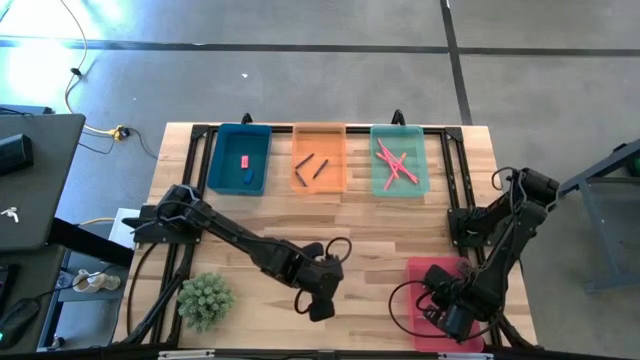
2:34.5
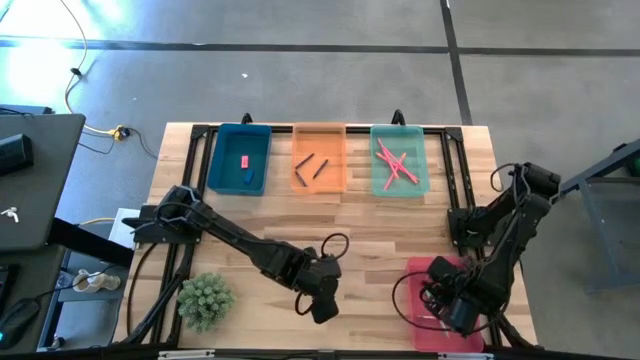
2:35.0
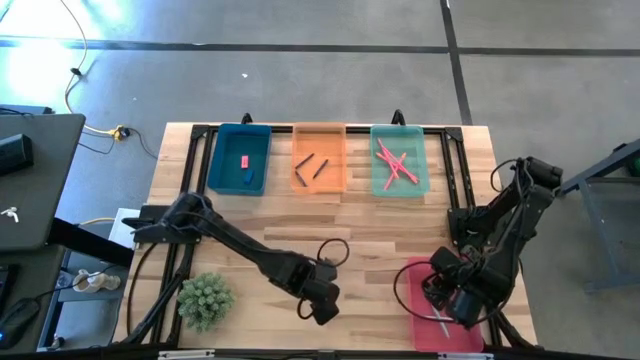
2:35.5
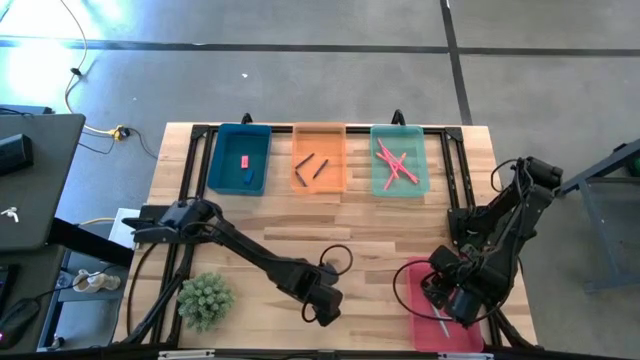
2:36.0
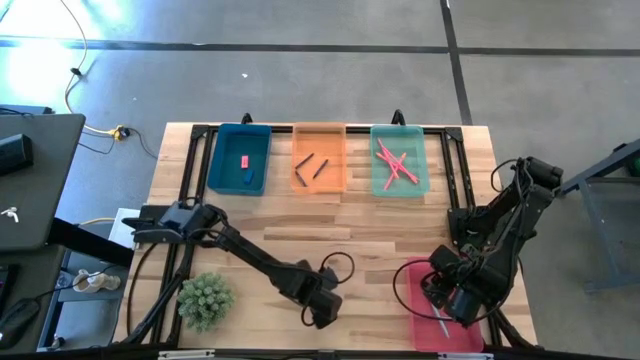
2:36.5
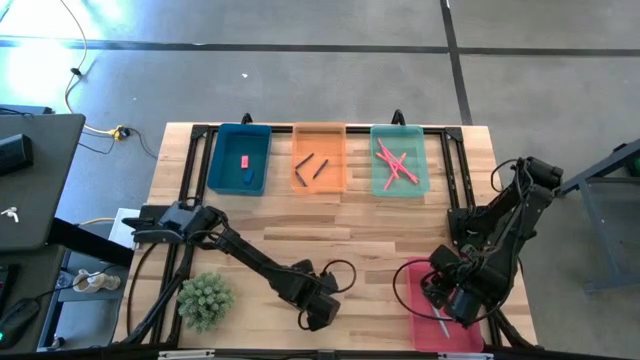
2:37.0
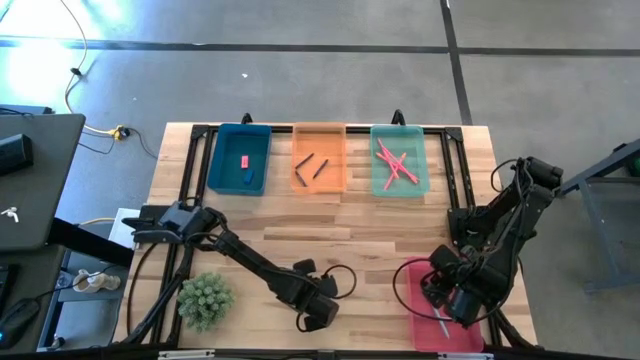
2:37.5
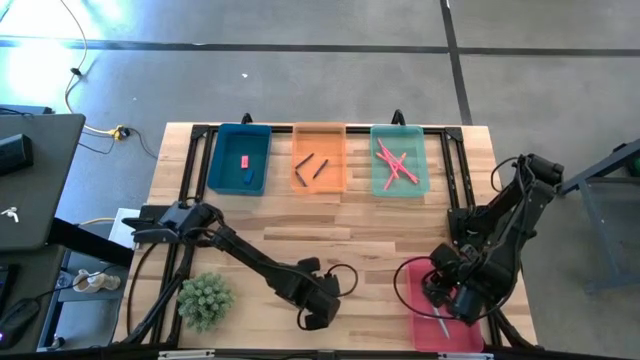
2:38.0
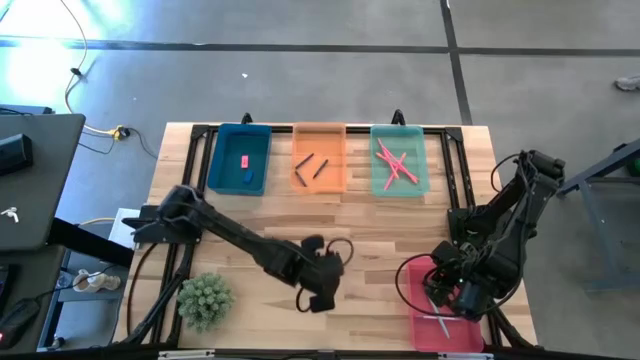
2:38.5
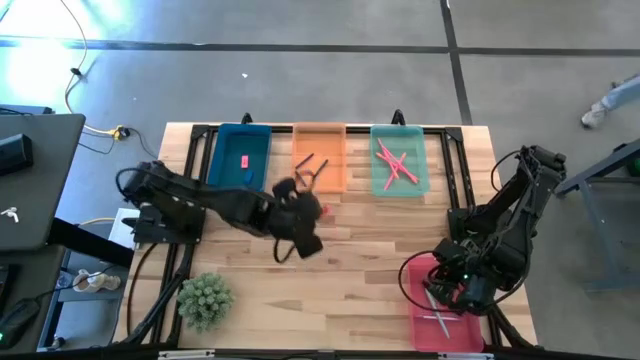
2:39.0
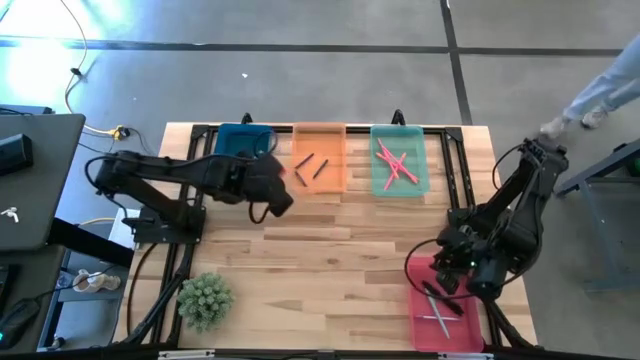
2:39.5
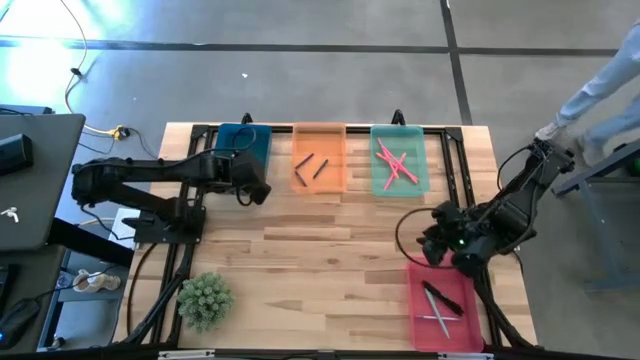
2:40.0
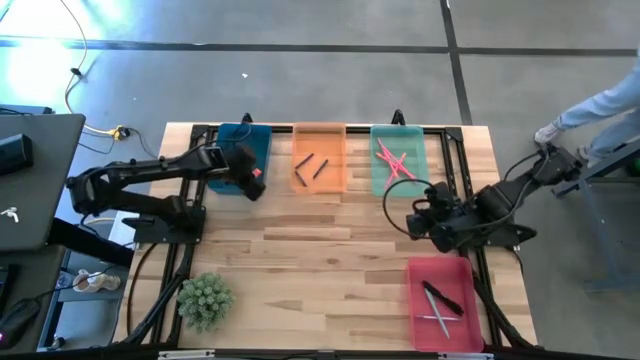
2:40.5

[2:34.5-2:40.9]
Task: Sort crayons/erasers/pens/pencils in bins
Put the orange eraser into the dark blue bin

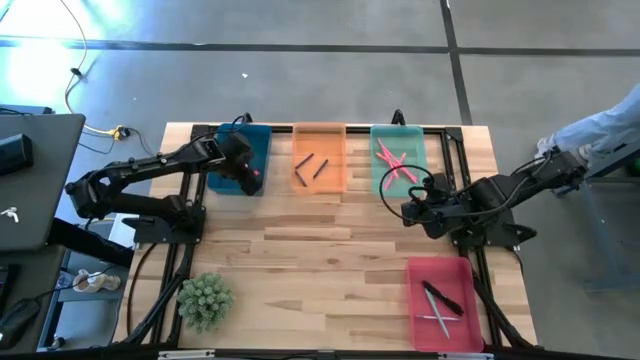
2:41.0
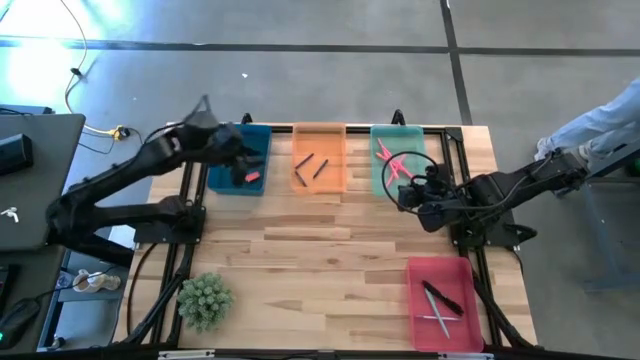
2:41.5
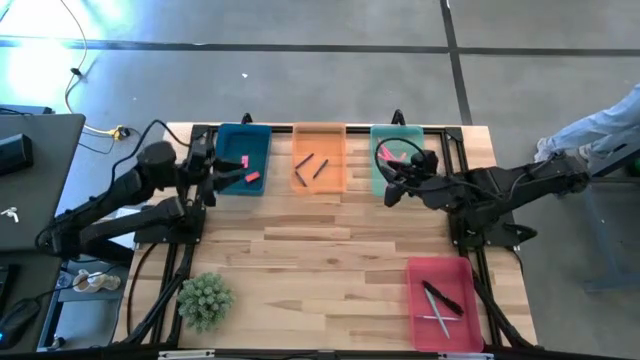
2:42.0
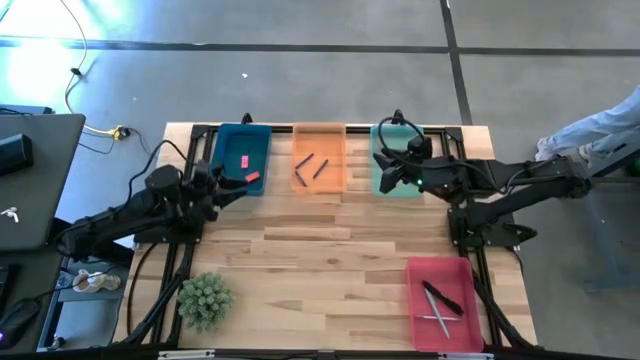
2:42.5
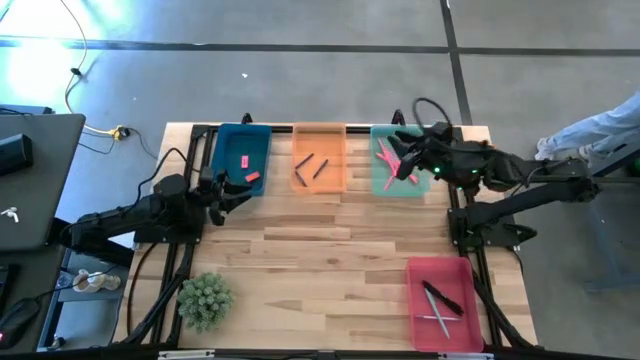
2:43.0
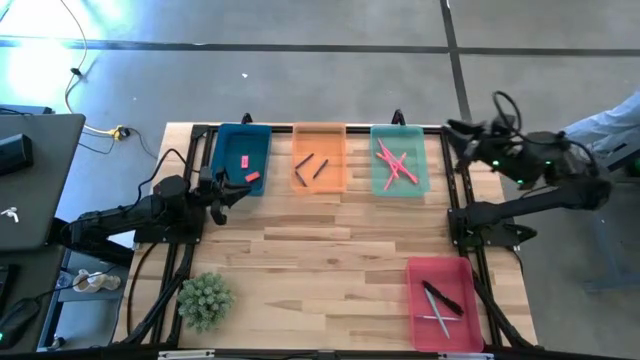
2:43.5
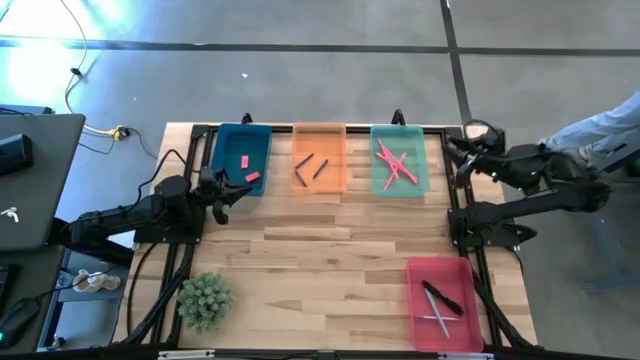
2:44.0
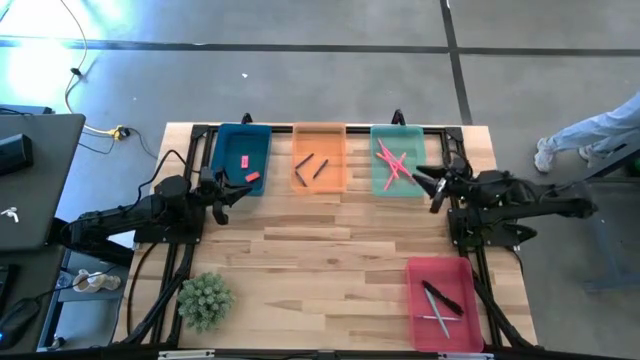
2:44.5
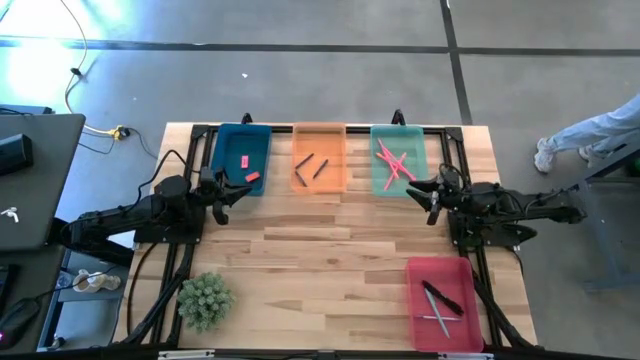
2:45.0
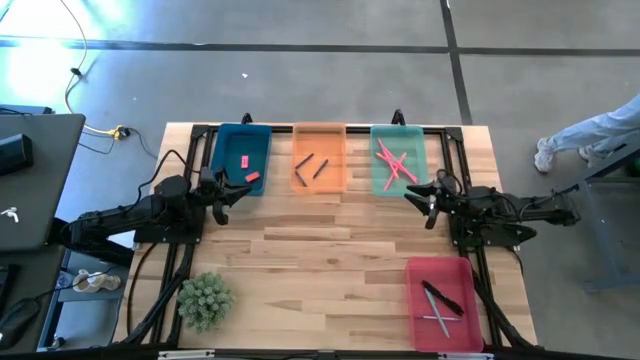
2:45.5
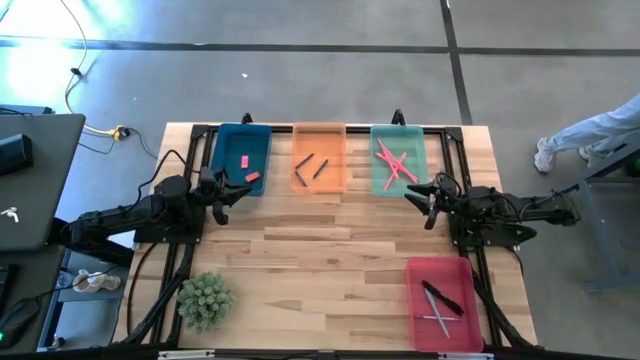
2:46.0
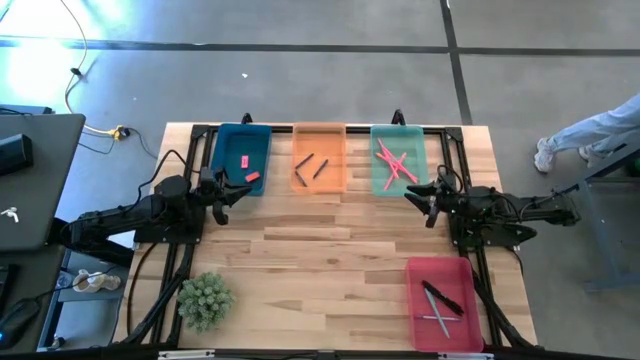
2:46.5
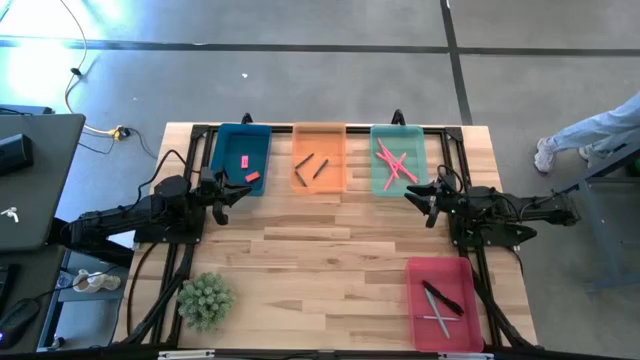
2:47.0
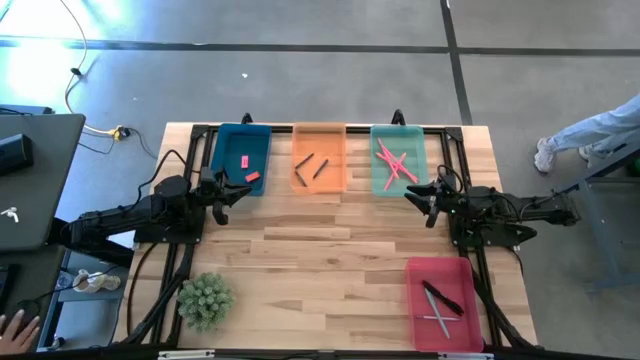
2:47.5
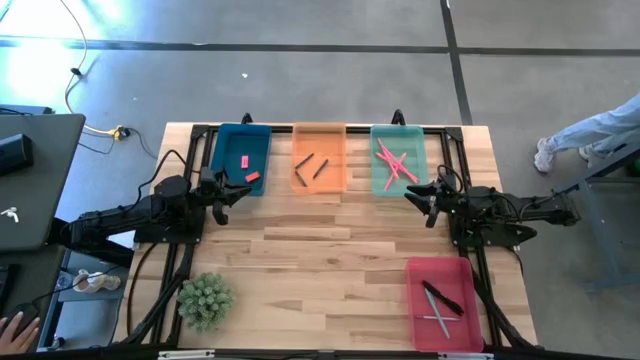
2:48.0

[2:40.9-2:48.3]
Return to Home Position

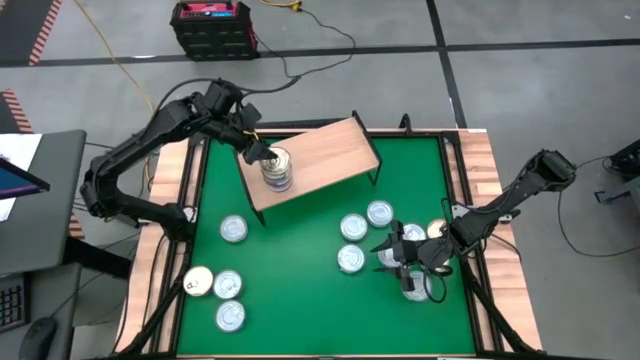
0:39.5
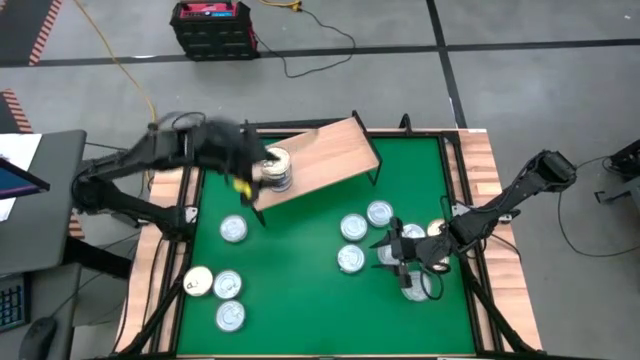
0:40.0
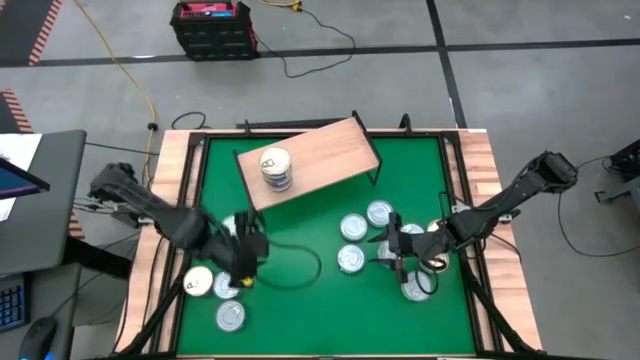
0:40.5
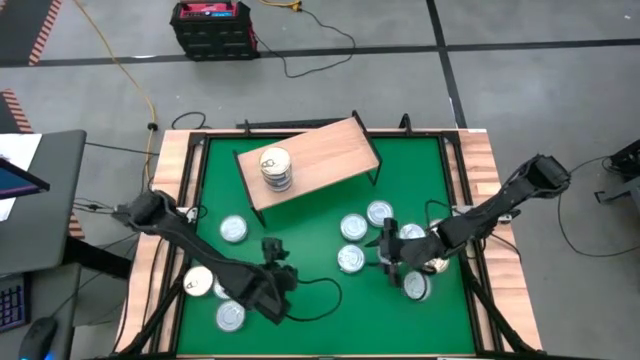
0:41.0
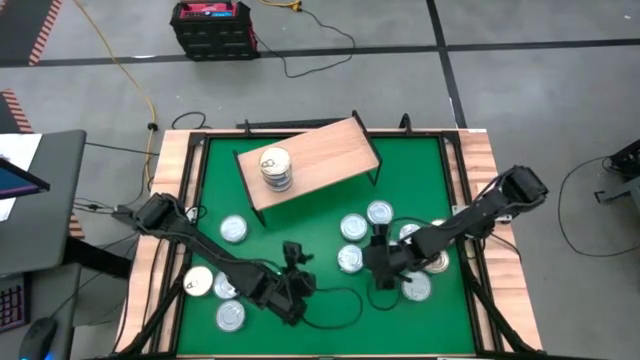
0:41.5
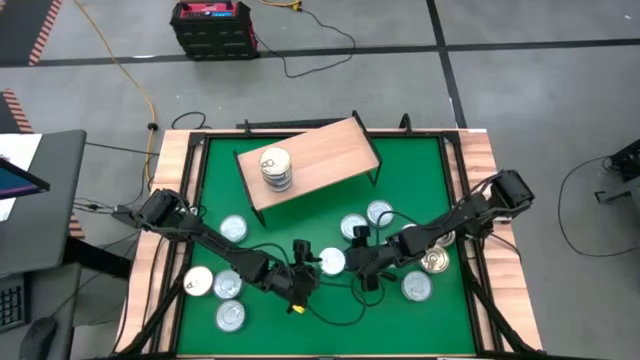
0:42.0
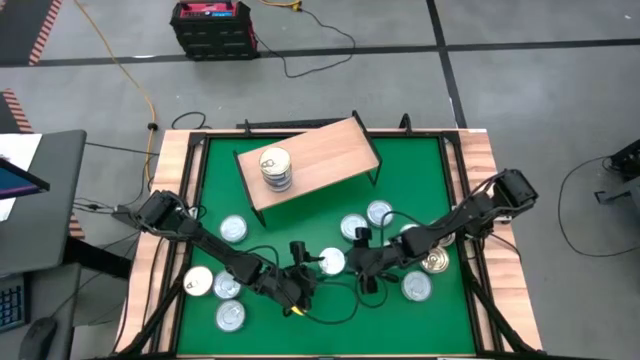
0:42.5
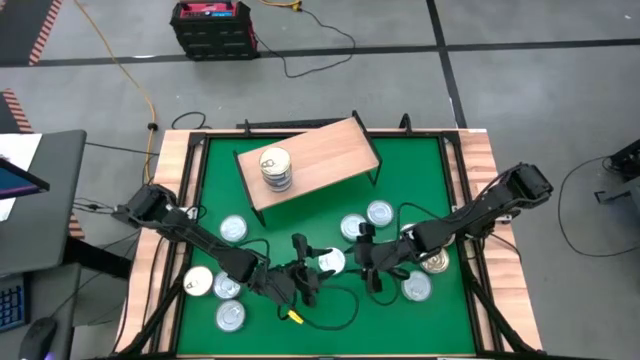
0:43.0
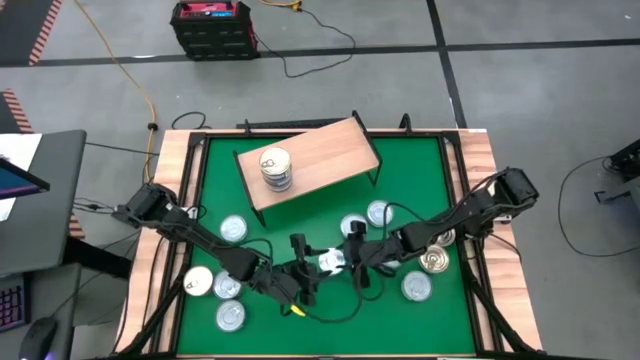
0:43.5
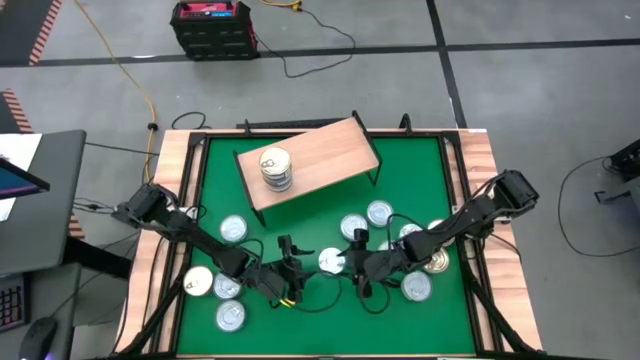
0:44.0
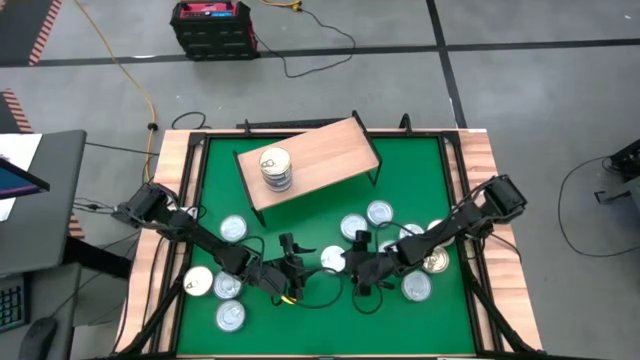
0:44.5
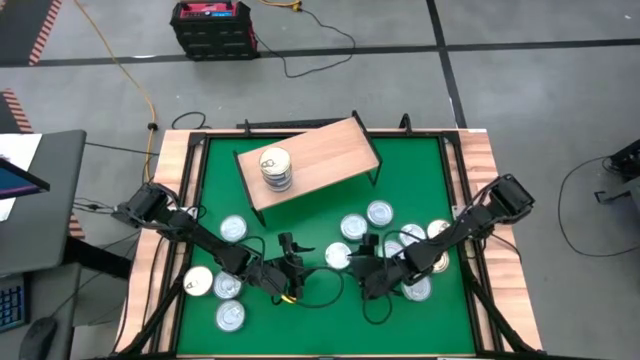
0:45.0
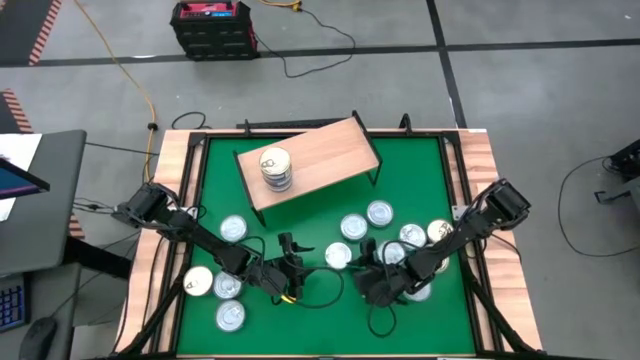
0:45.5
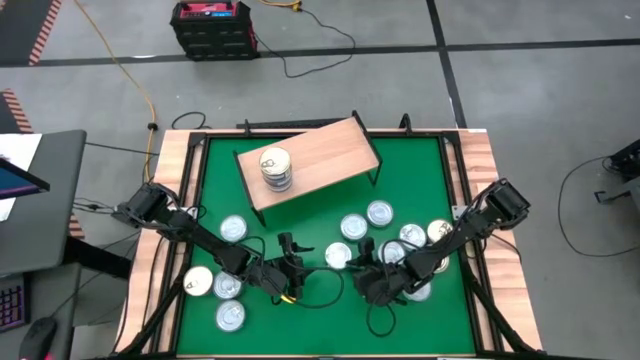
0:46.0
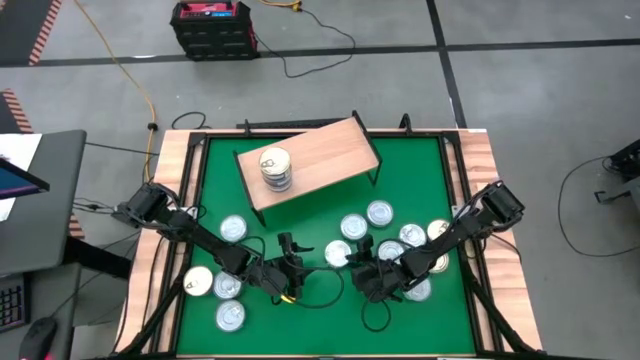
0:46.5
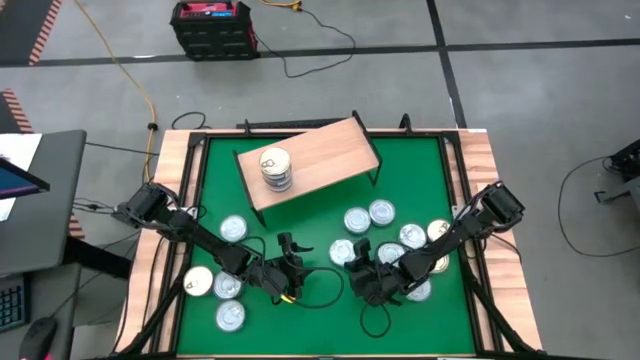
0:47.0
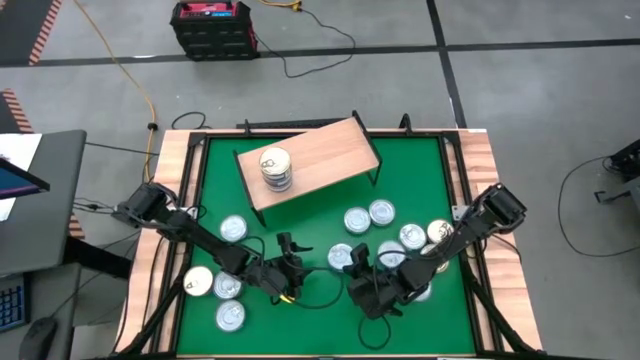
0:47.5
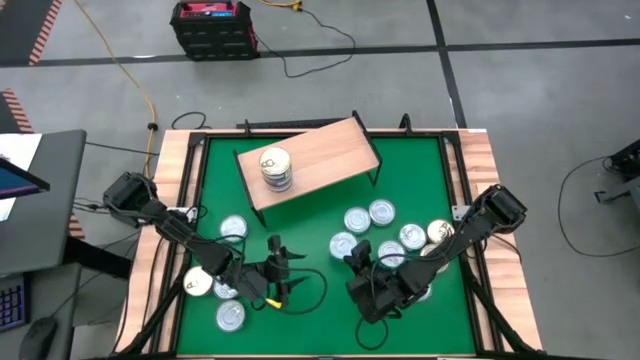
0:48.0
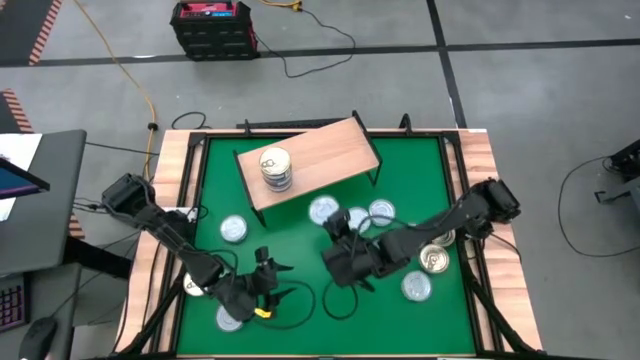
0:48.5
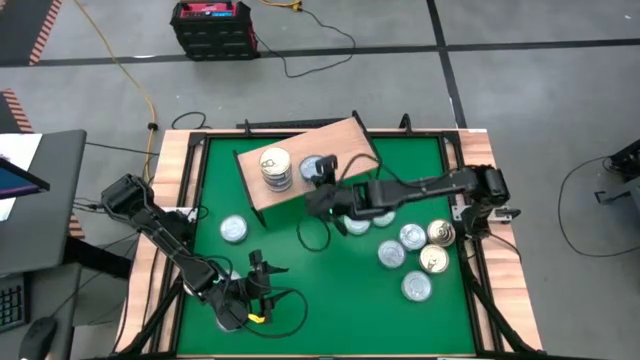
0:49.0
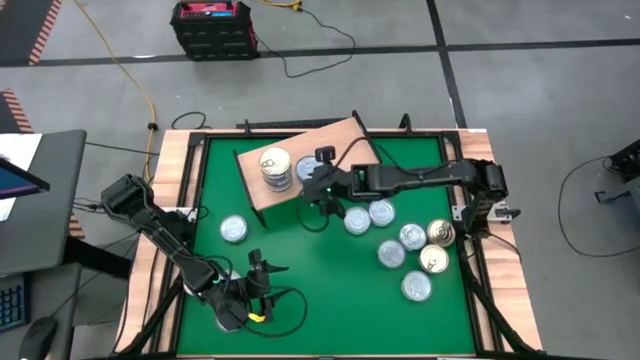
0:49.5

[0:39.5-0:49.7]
Task: Stack canned seafood by type on shelf
Put the blue tuna can on the shelf
